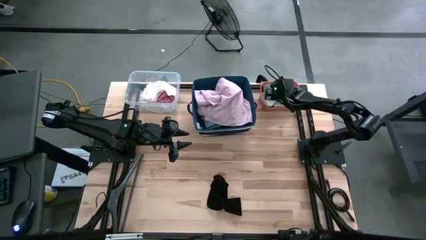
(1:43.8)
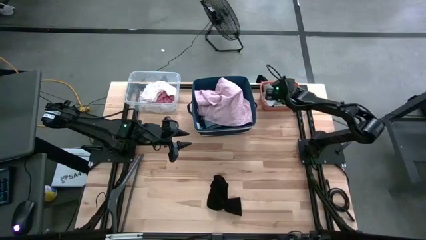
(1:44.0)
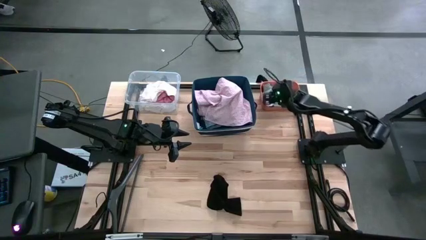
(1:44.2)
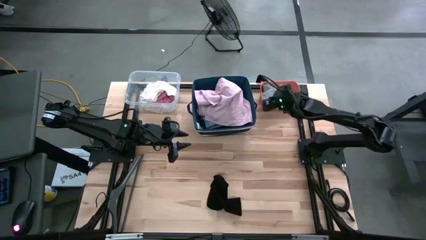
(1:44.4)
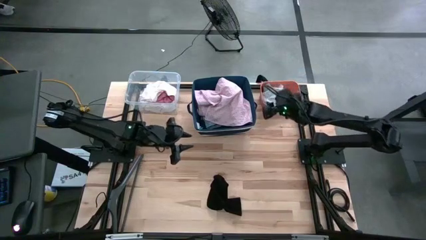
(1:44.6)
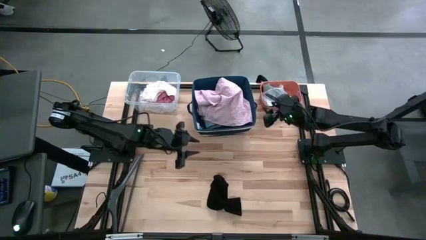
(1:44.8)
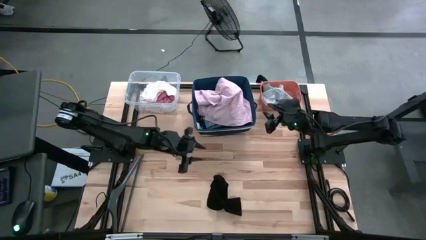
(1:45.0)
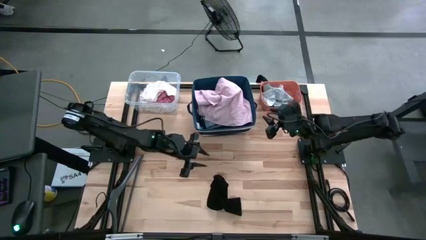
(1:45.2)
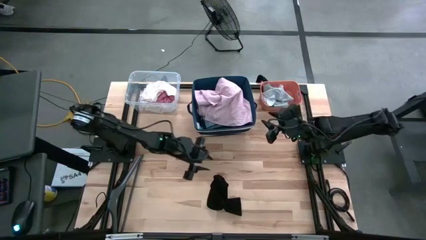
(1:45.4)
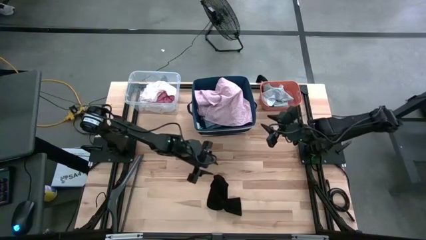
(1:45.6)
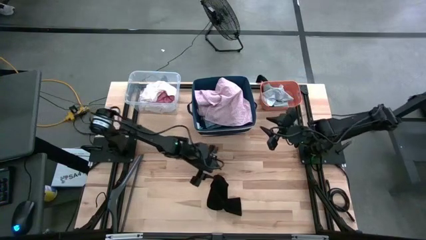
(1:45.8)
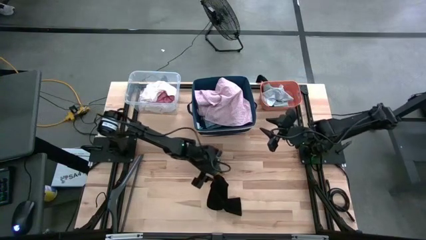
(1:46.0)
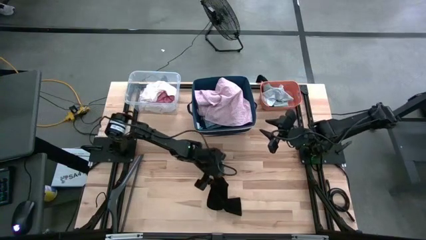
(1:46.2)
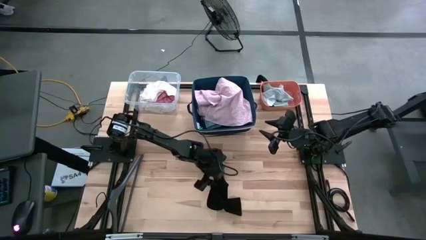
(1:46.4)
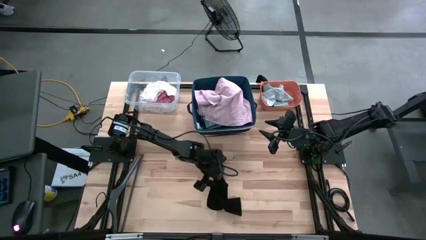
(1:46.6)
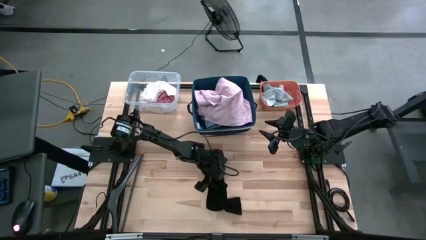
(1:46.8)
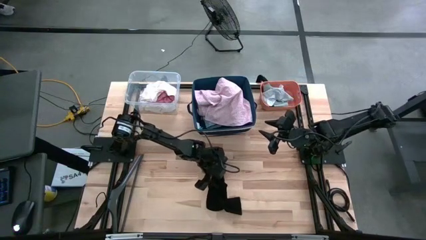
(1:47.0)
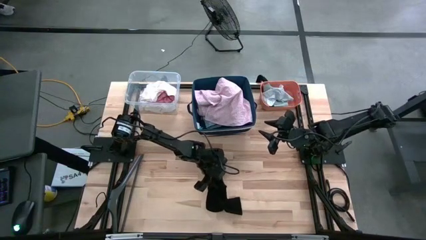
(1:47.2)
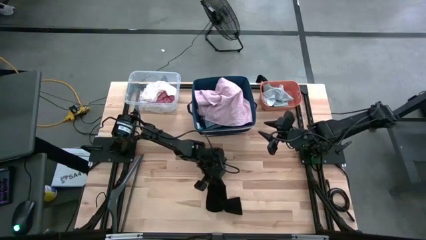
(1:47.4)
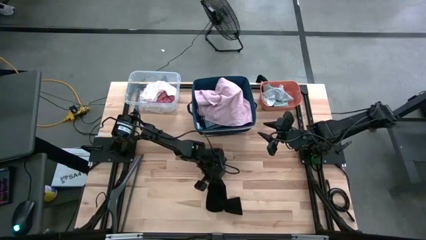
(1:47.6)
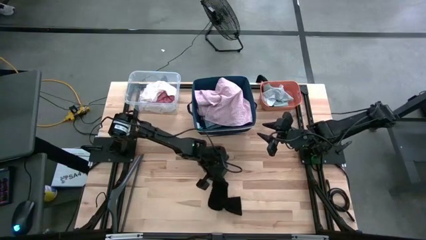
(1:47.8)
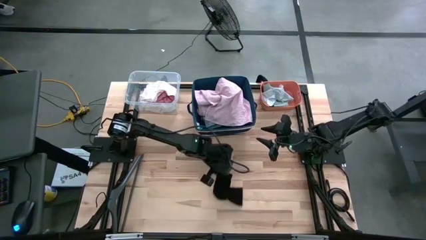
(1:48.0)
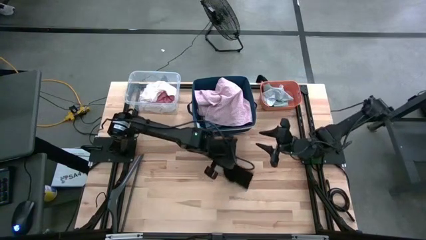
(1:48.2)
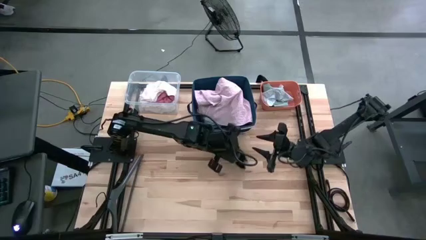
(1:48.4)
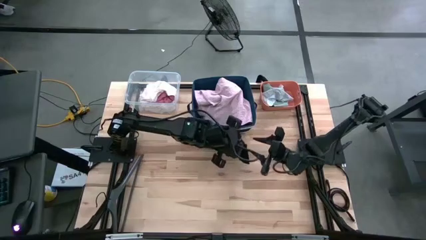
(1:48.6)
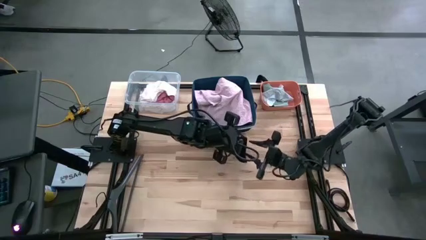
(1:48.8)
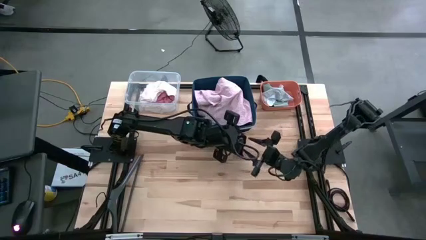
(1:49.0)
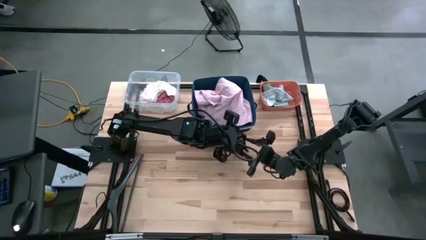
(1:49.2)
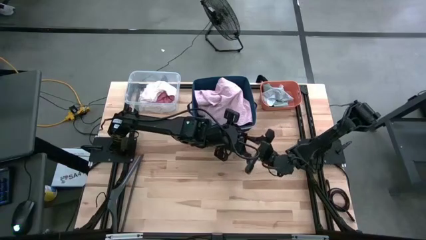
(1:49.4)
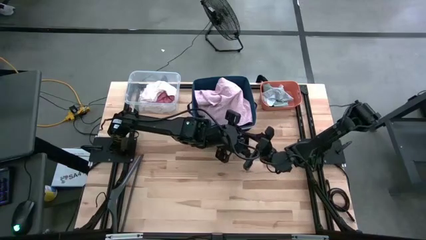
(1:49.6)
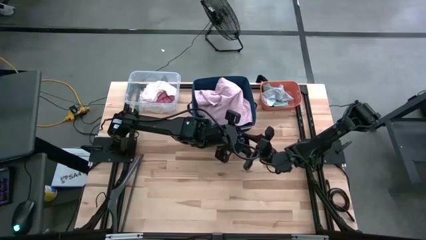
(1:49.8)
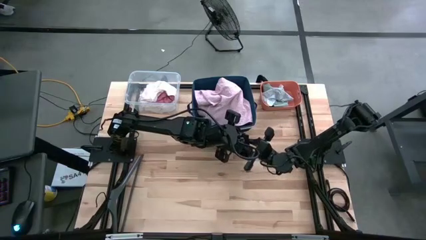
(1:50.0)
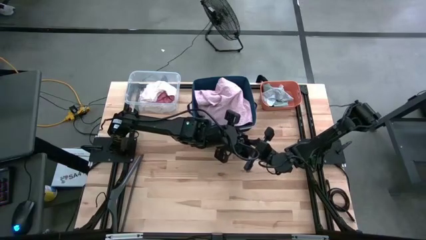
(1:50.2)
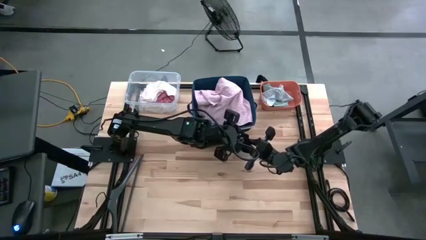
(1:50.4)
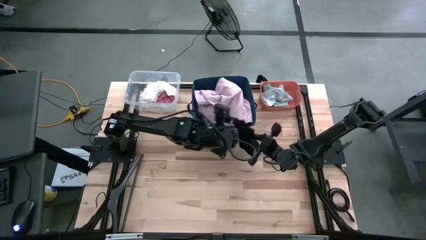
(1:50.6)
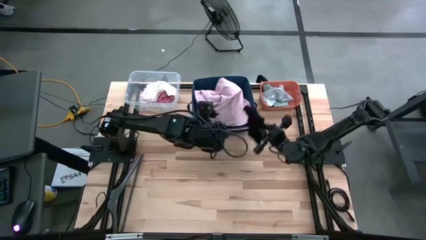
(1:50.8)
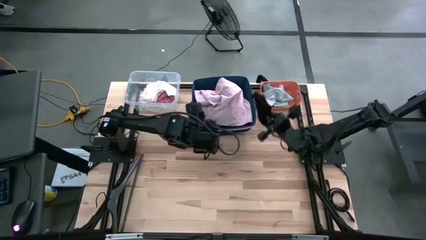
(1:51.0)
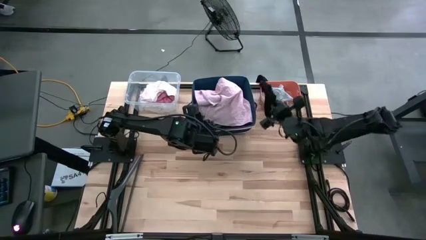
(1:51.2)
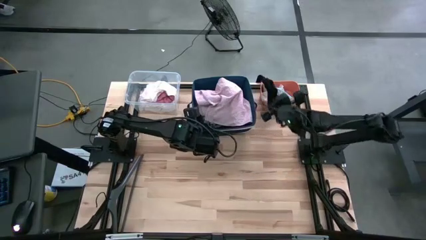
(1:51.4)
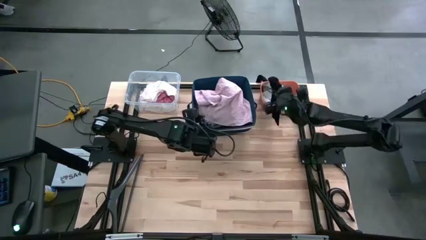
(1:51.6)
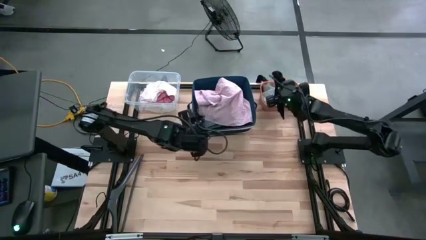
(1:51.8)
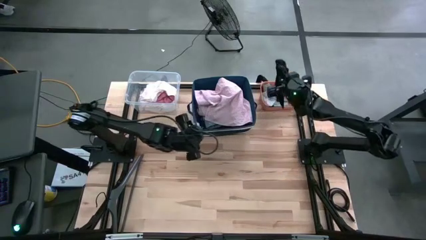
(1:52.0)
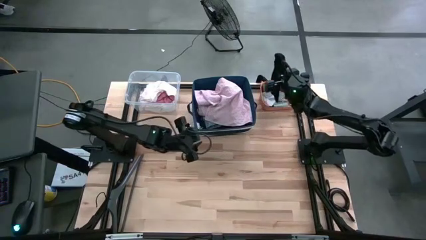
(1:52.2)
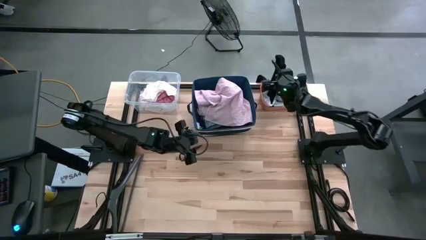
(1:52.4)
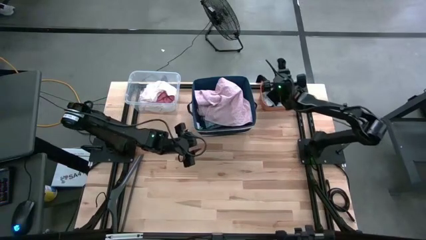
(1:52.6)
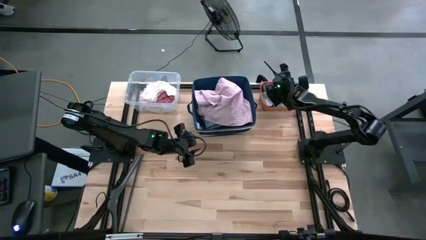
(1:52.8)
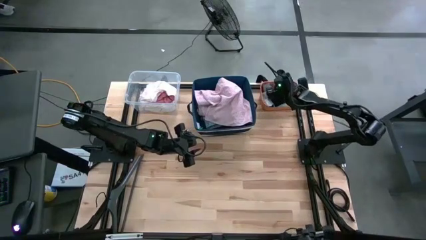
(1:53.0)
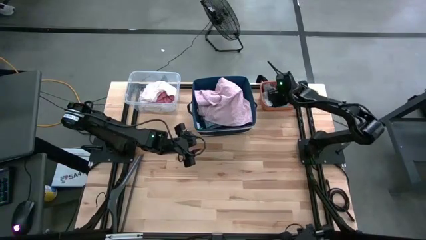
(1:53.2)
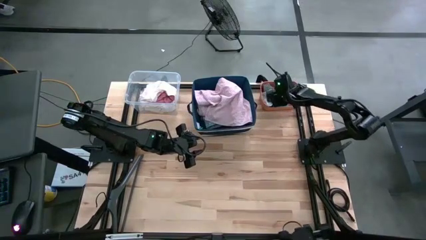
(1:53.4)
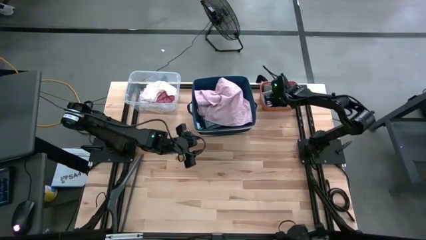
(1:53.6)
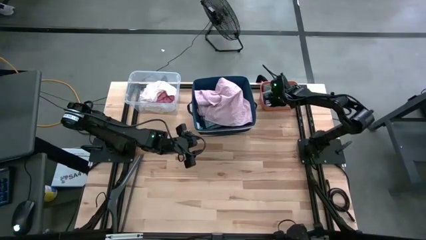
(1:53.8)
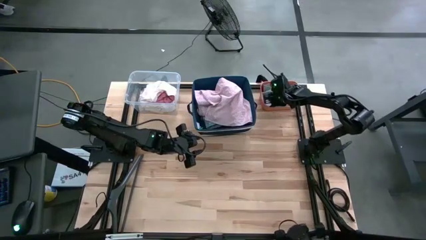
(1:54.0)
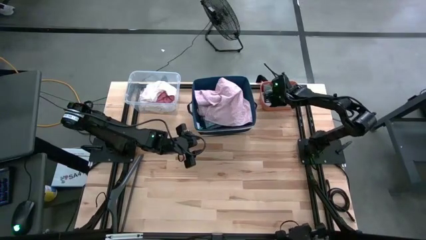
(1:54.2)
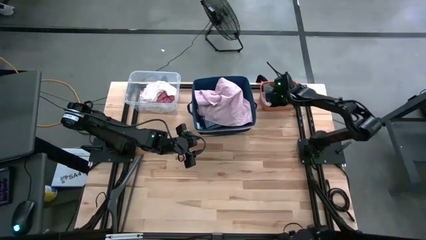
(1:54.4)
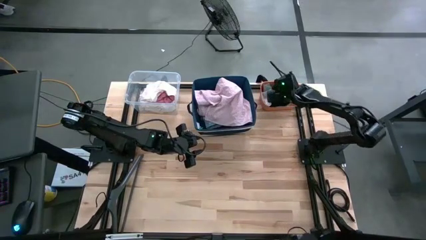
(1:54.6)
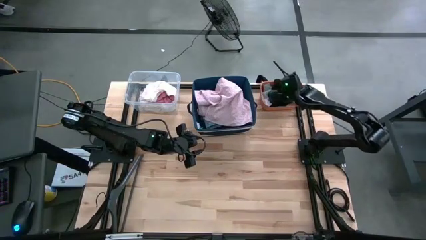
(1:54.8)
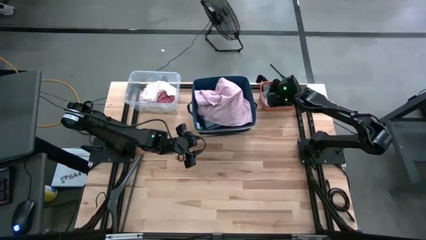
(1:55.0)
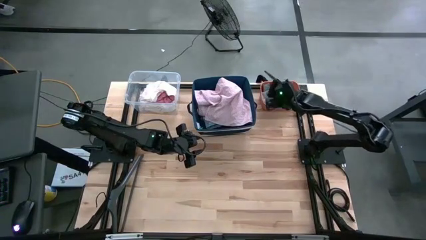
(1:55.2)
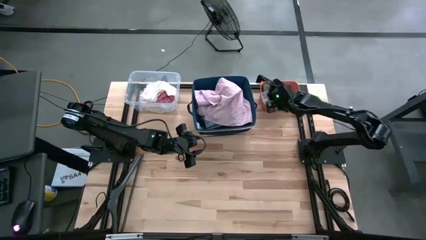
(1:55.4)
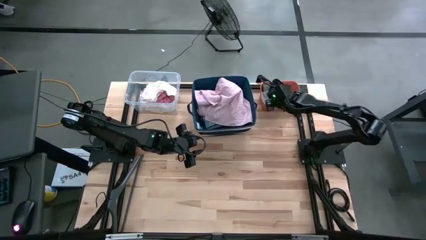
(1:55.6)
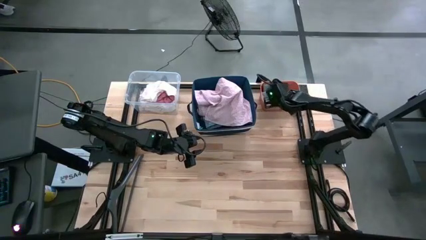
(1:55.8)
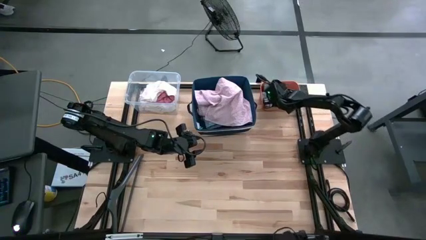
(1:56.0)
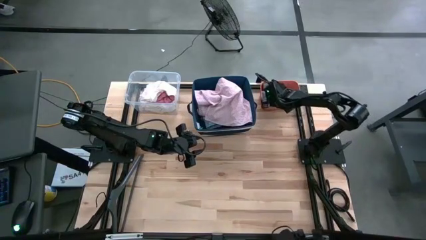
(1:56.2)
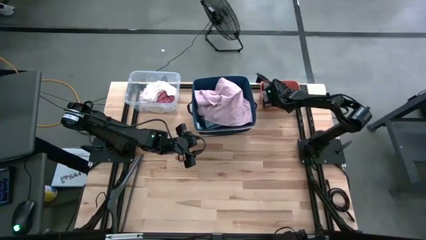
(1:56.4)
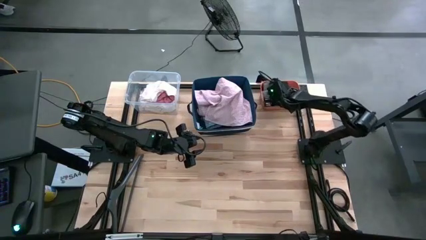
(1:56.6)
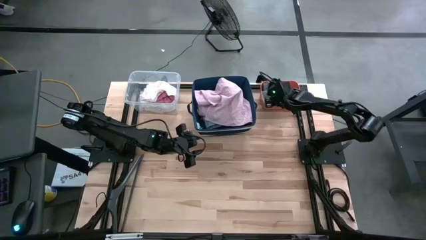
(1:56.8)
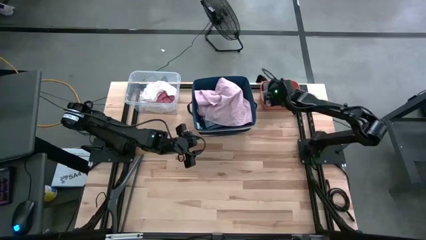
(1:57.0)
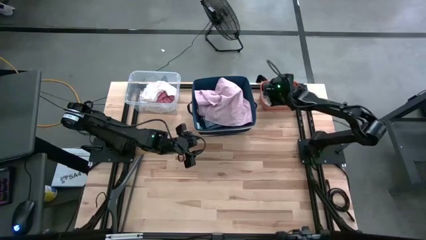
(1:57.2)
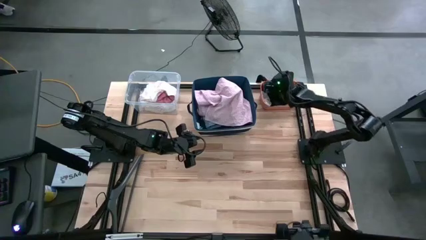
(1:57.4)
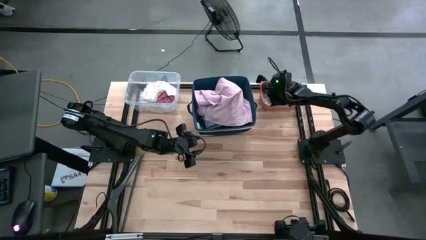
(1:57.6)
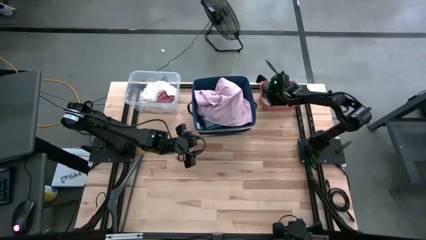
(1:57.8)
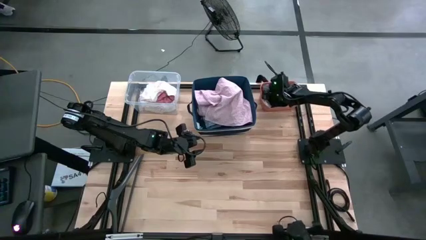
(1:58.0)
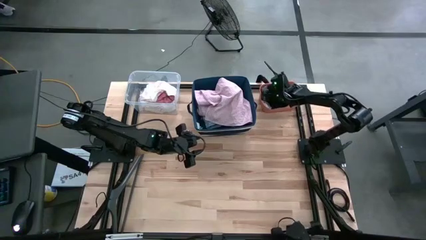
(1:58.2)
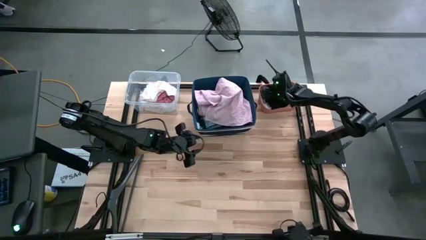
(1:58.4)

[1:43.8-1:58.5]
Task: Pick & Place Cloths
Put the black sock into the orange bin

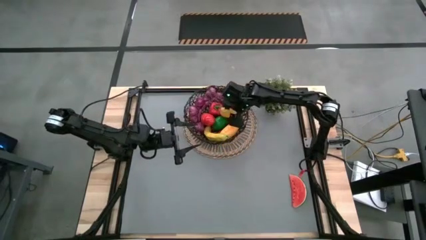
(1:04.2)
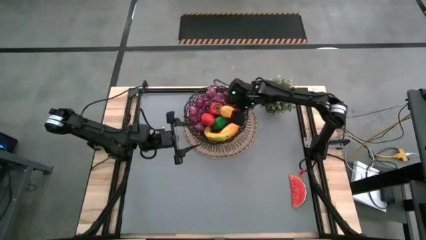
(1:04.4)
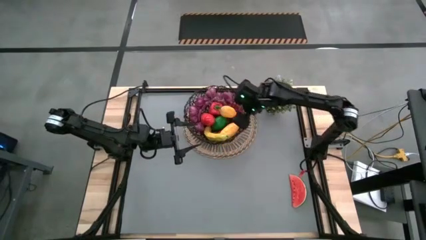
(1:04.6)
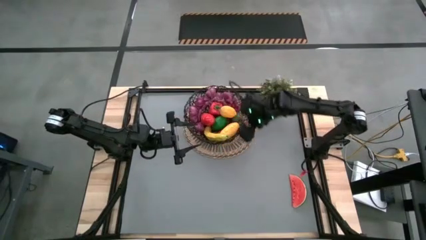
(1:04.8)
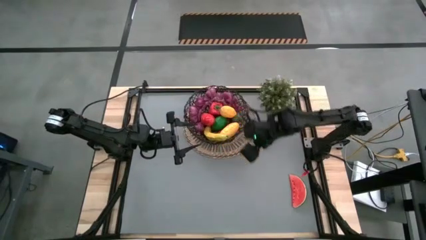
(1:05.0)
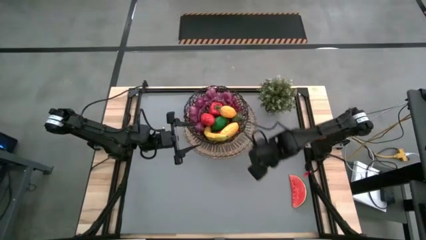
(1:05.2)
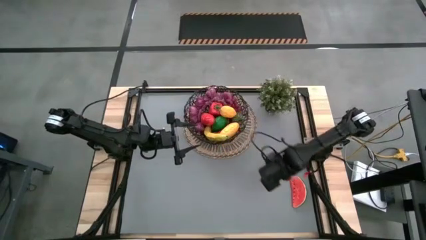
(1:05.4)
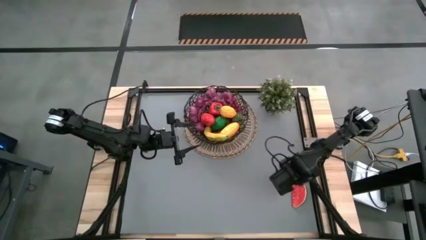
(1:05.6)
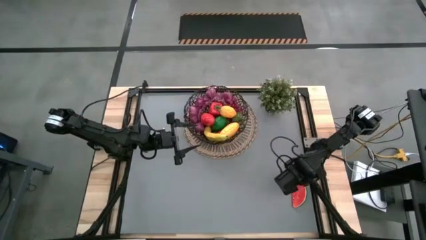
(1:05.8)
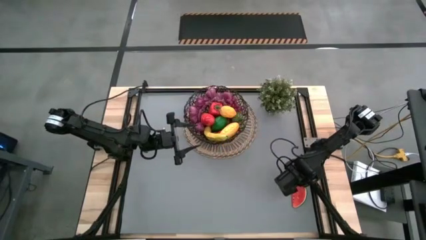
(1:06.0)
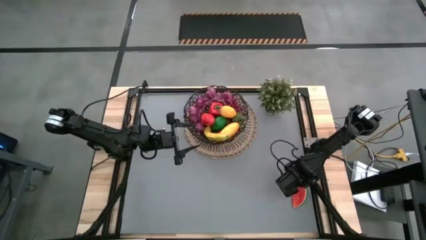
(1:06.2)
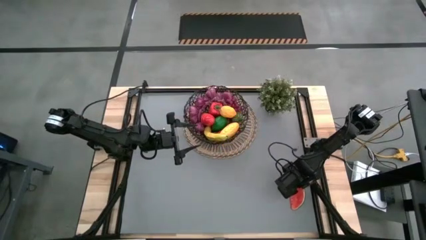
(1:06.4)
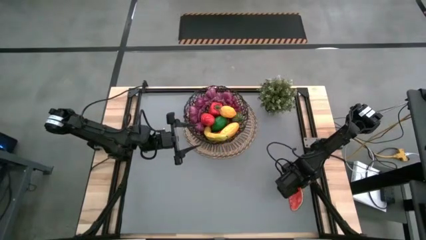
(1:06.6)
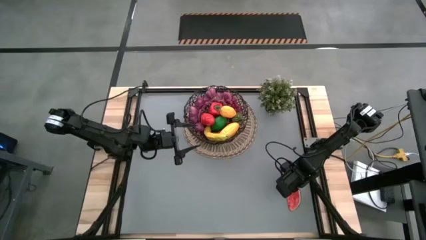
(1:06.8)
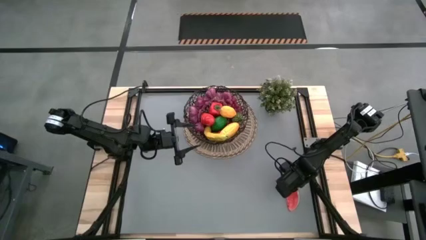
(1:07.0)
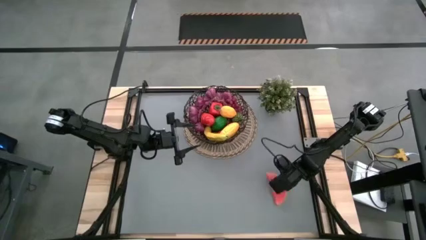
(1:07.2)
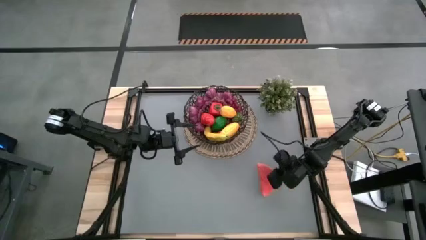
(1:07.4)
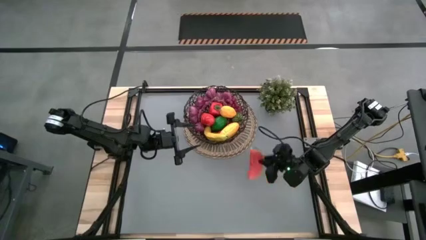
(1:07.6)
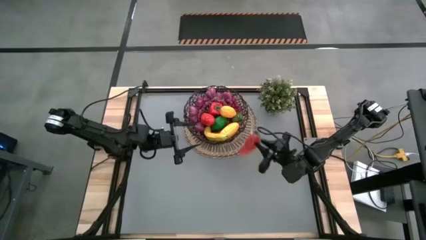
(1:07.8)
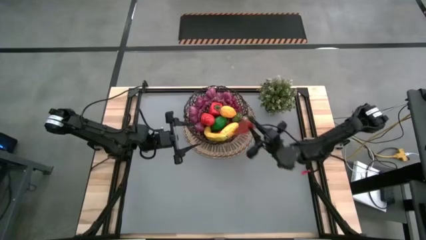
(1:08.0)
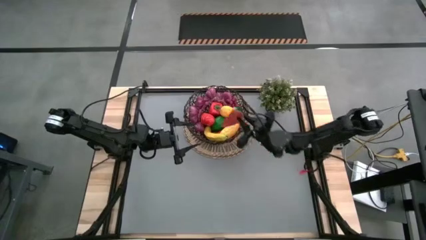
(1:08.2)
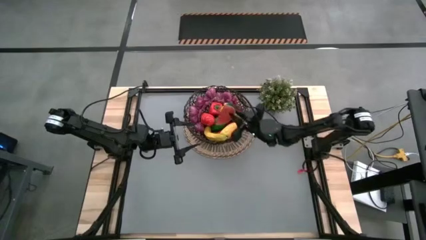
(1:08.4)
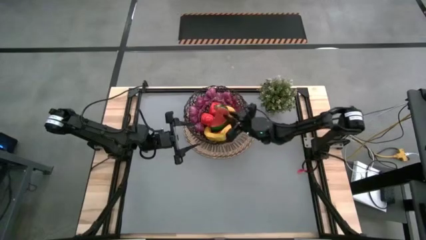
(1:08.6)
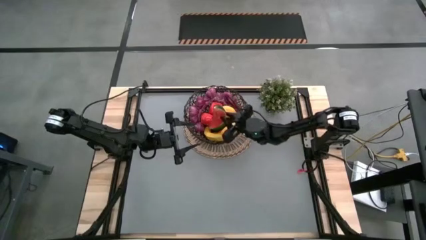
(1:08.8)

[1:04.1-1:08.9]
Task: Build produce basket
Put the sliced watermelon into the basket
